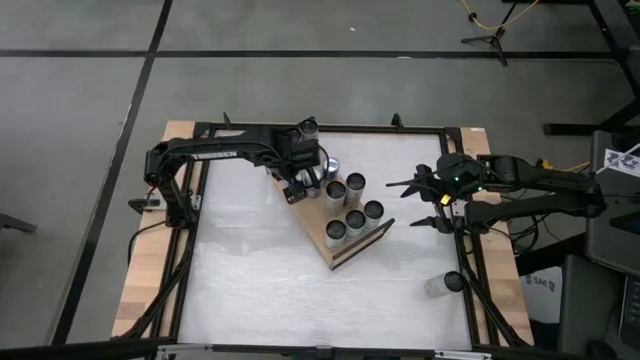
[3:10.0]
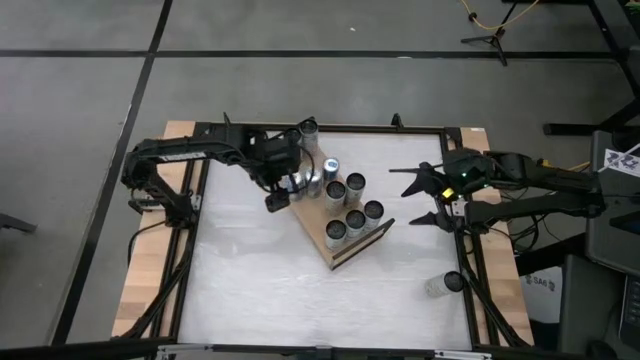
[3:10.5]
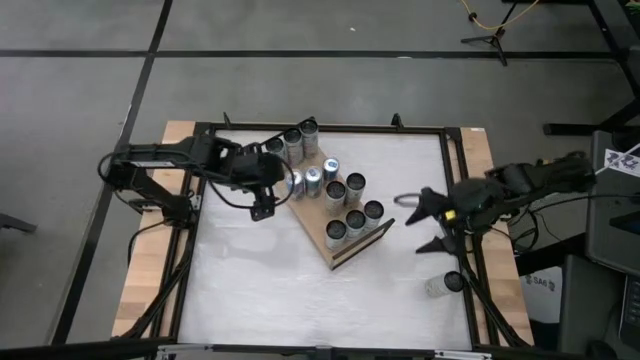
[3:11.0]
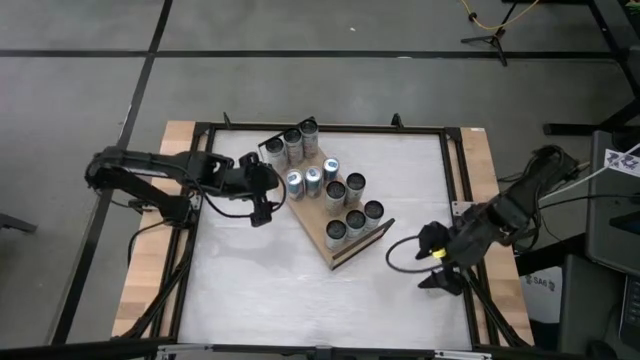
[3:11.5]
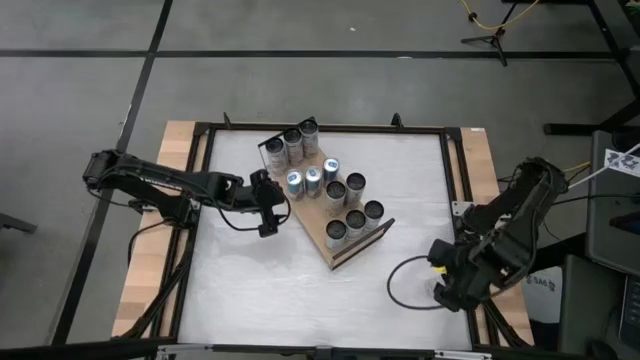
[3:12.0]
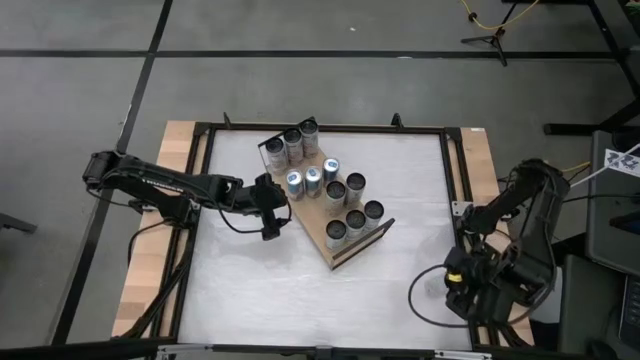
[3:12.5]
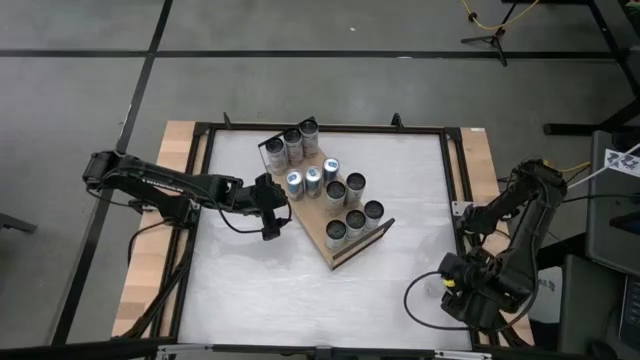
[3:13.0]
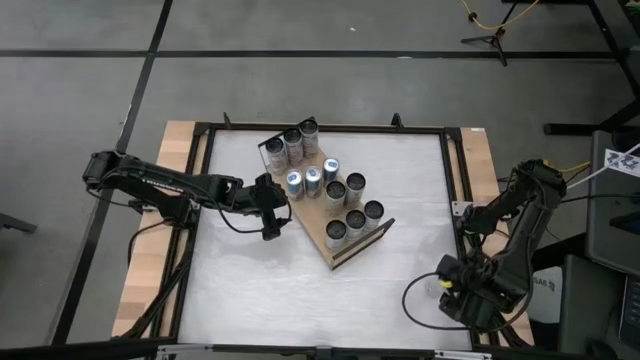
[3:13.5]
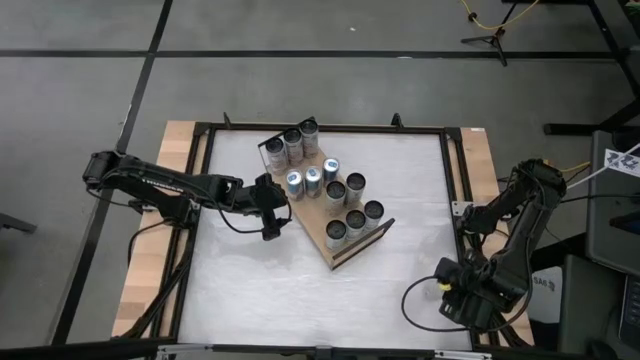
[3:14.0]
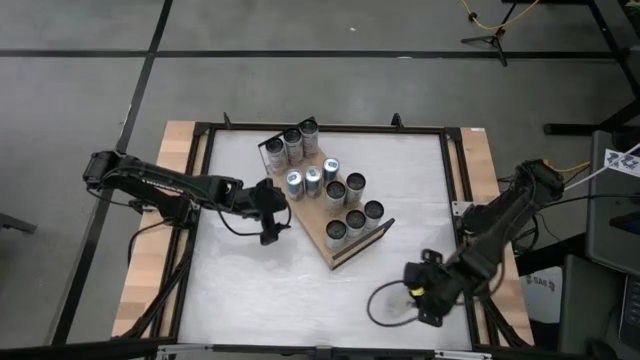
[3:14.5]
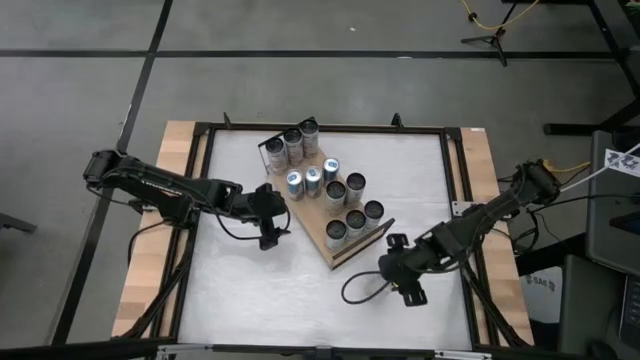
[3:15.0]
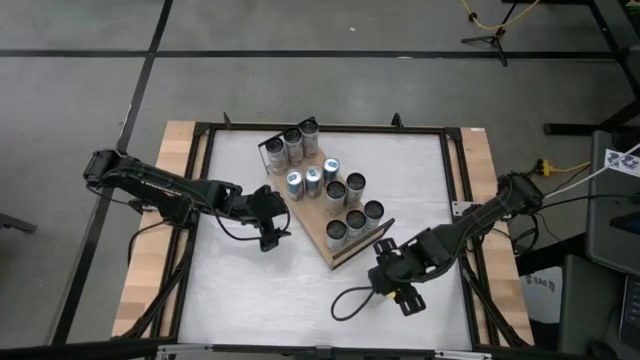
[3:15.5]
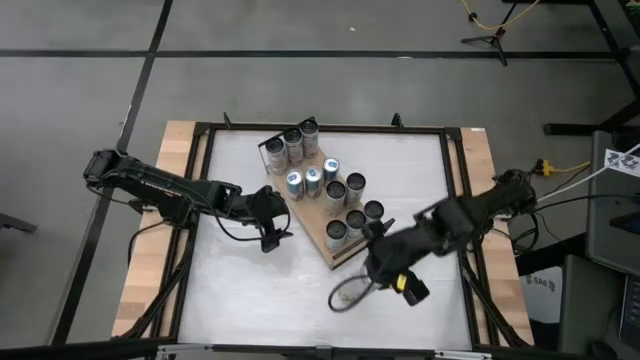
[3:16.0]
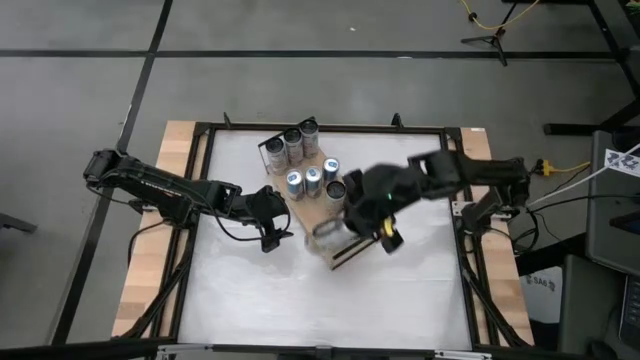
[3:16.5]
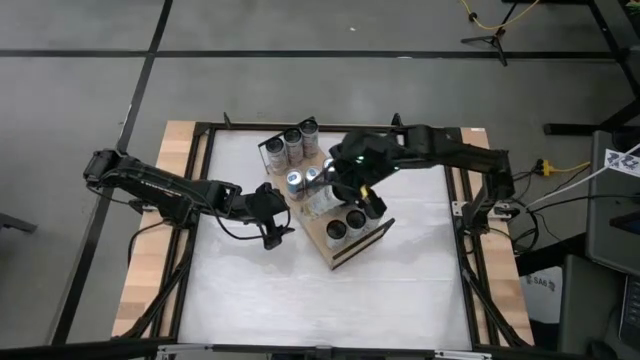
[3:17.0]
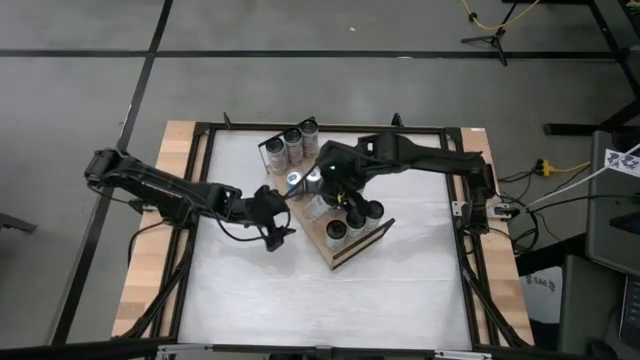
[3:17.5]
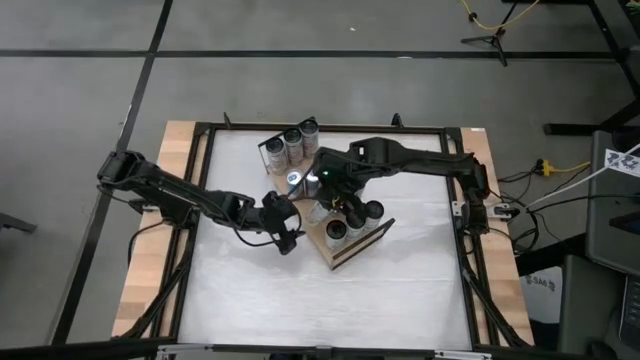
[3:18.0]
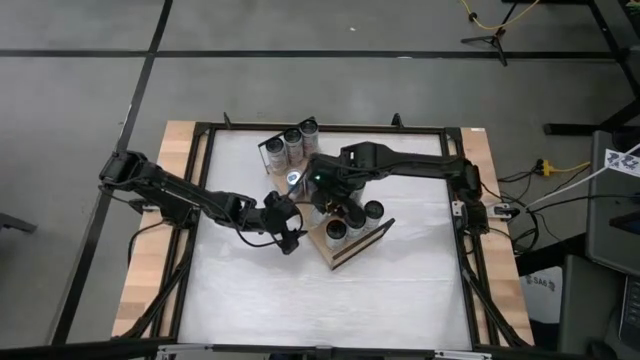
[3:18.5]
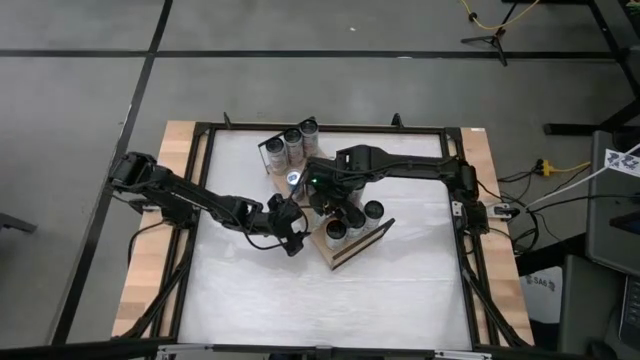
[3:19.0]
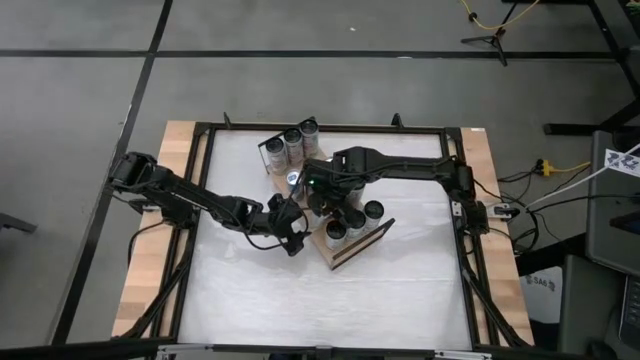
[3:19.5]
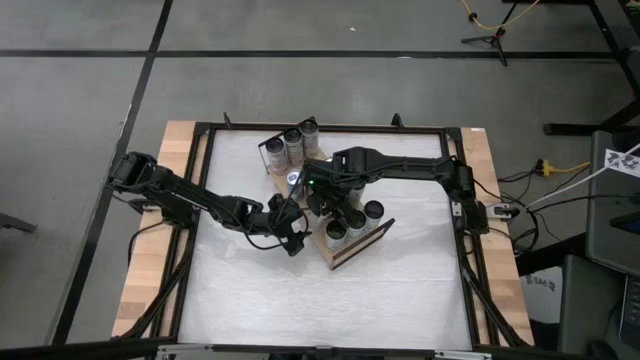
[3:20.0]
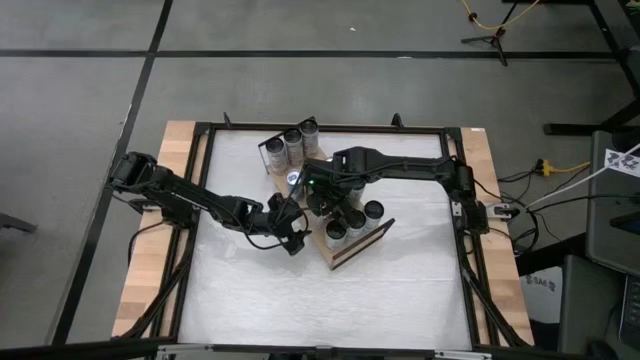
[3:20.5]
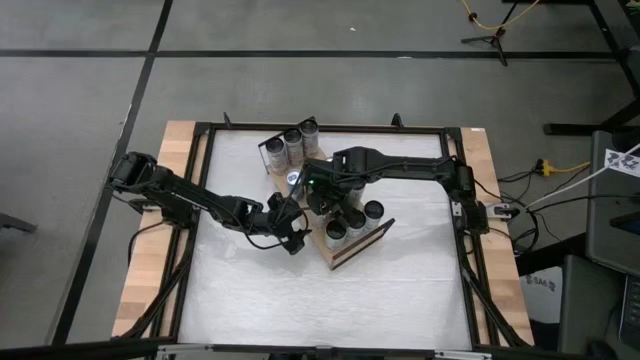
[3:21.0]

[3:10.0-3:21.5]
Task: Place canned beverage on shelf
Put the white-orange soda can on the shelf and align with the other white-orange soda can

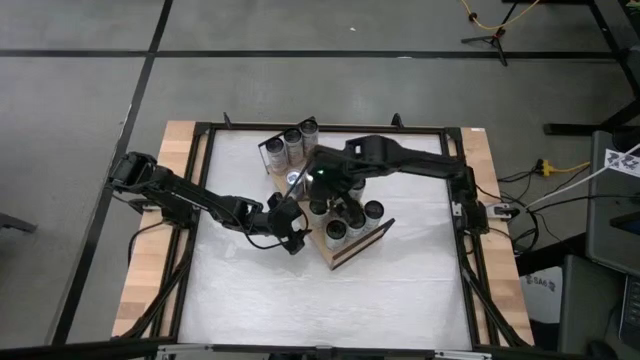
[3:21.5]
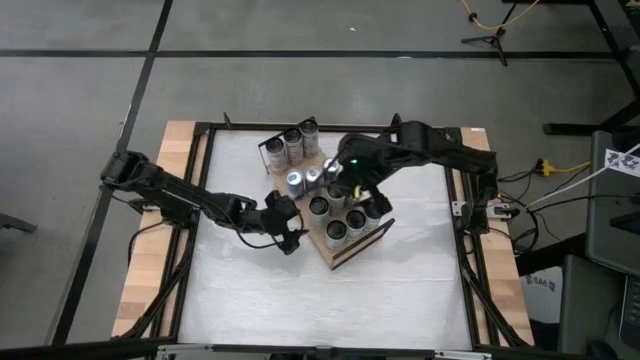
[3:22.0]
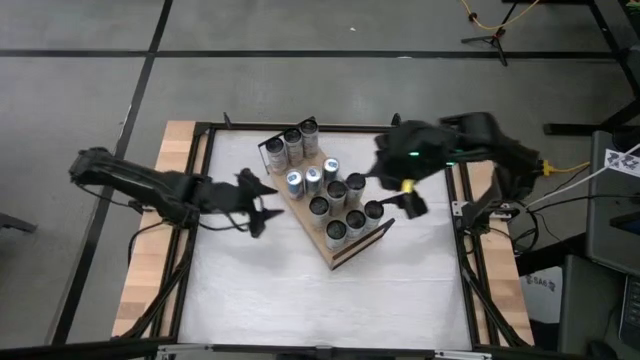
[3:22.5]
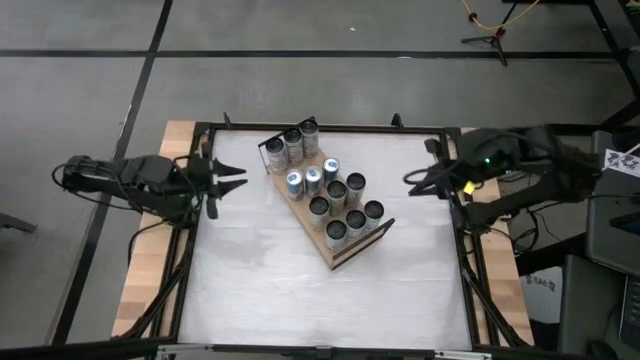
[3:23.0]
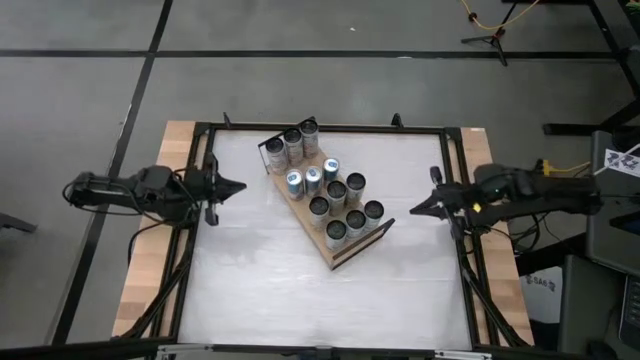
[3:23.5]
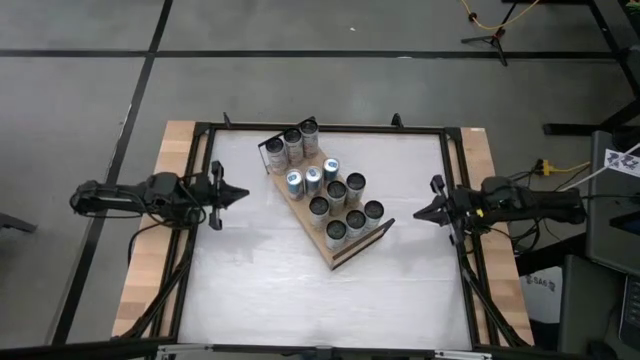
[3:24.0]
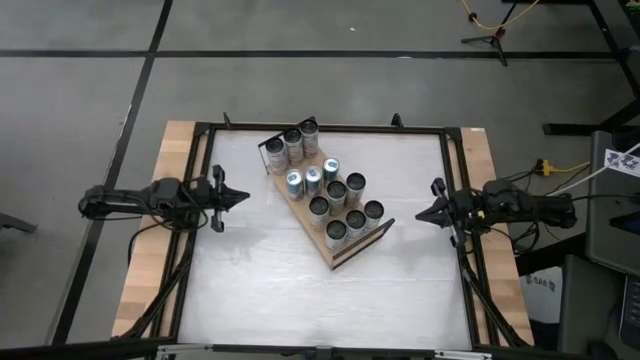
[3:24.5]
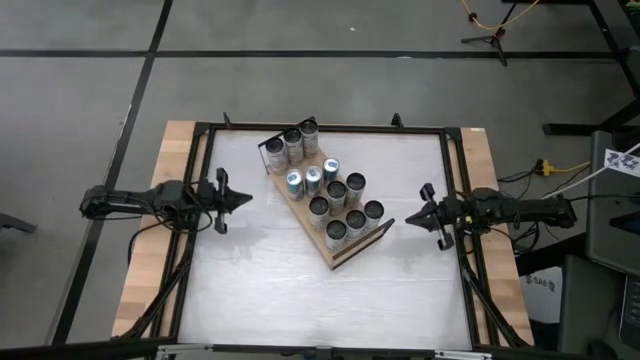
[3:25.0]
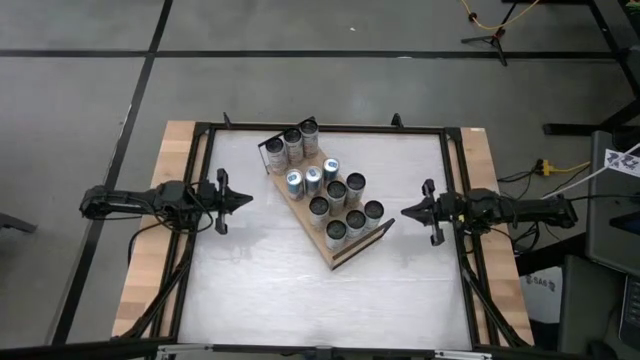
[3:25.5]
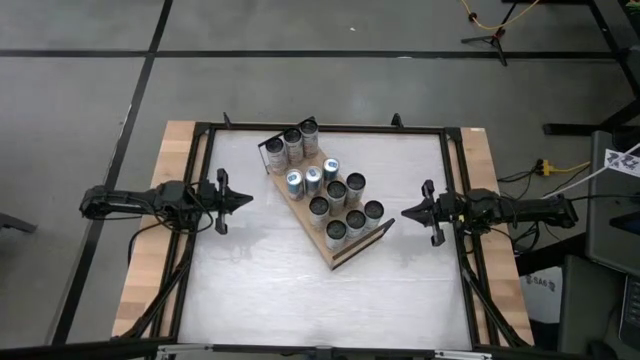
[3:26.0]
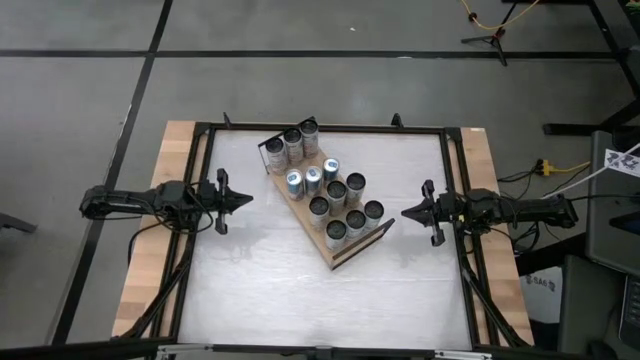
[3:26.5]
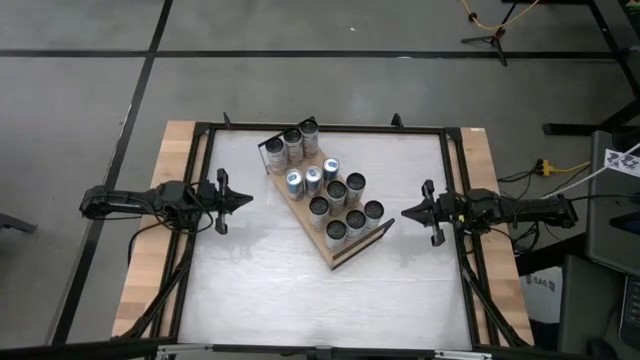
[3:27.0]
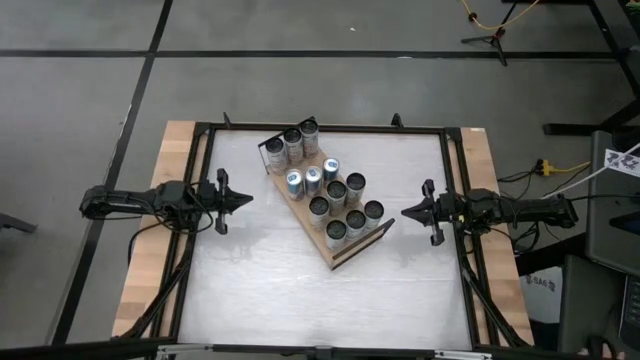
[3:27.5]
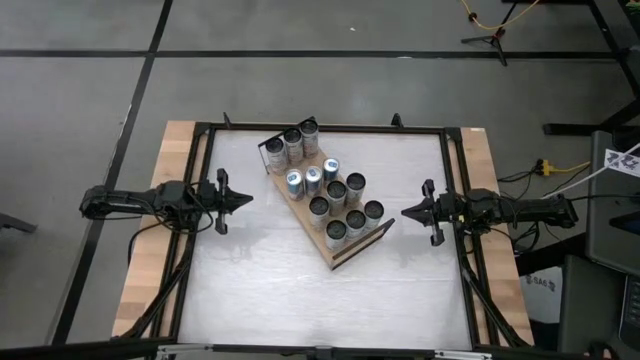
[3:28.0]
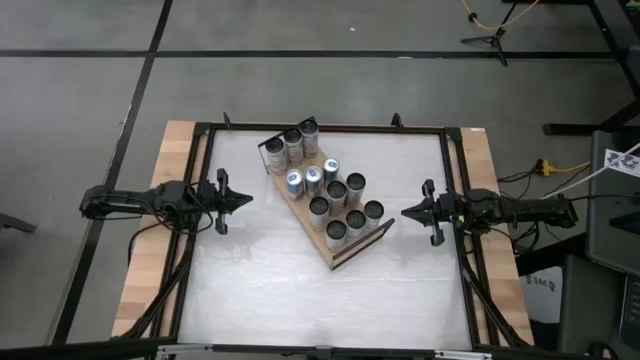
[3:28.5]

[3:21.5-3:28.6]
Return to Home Position

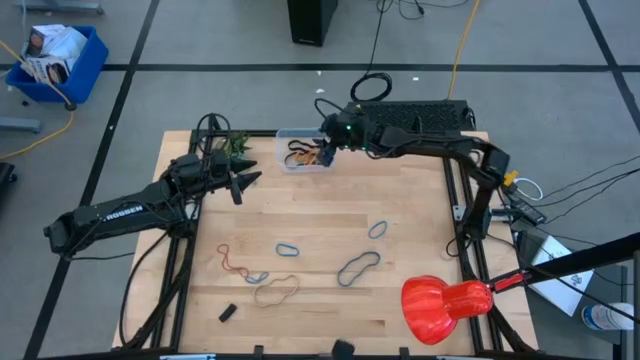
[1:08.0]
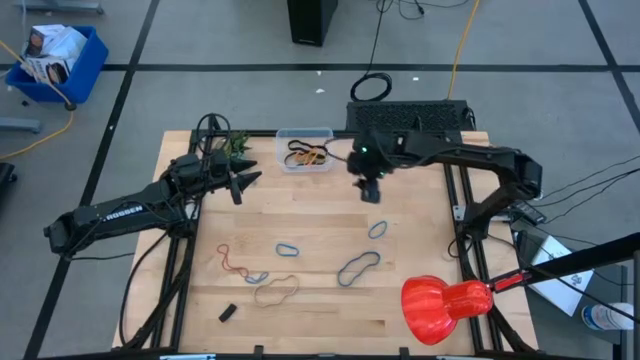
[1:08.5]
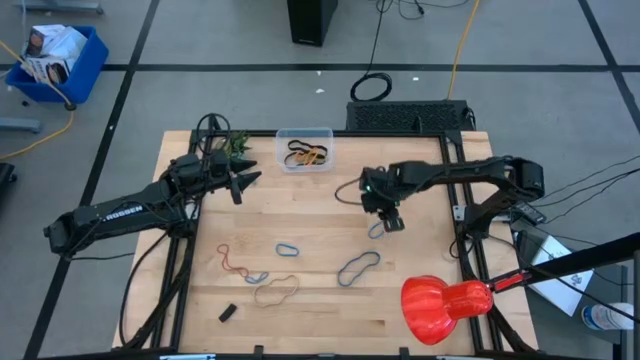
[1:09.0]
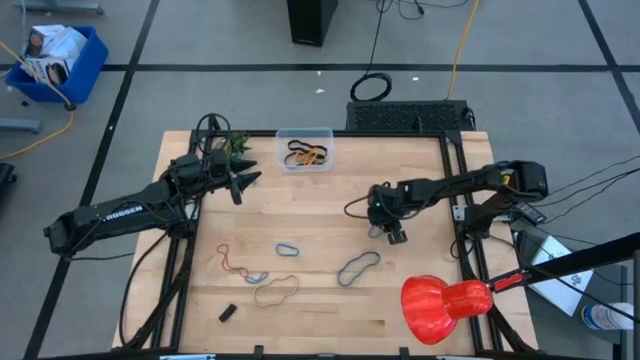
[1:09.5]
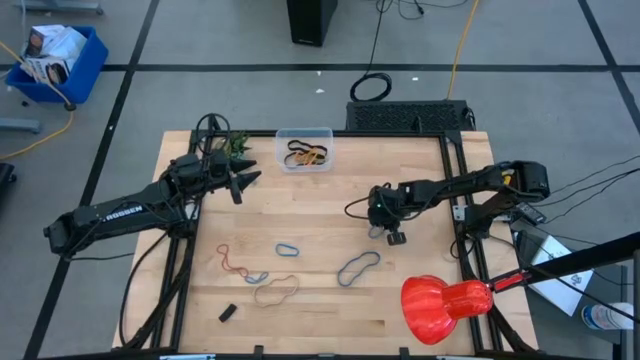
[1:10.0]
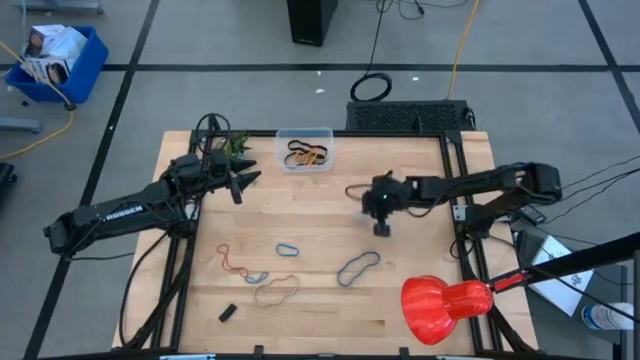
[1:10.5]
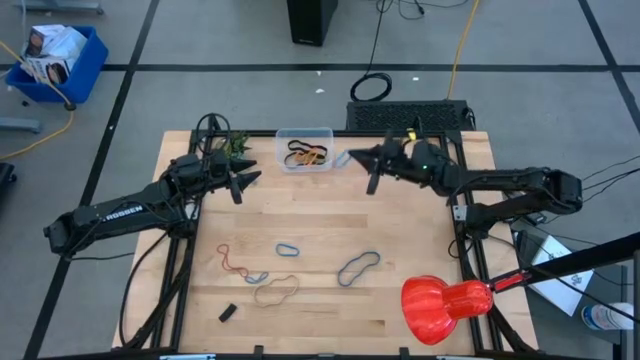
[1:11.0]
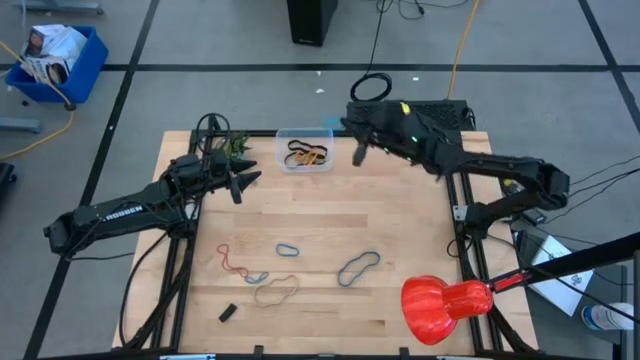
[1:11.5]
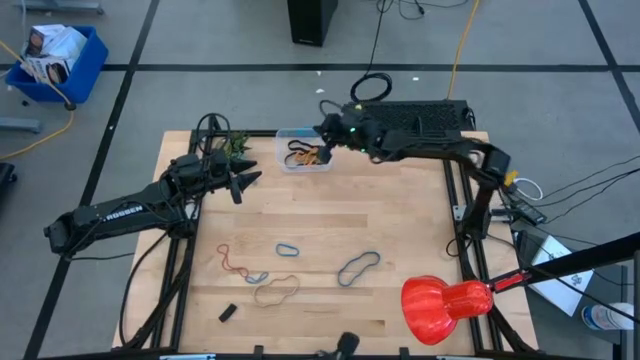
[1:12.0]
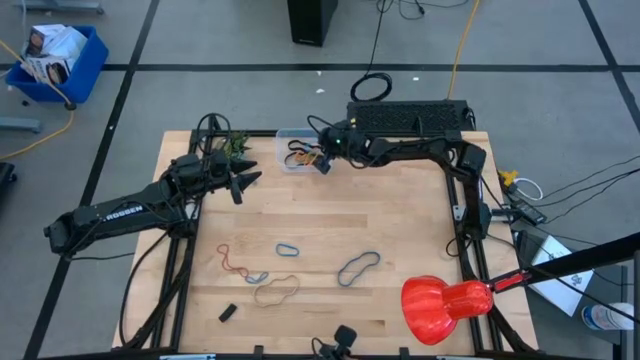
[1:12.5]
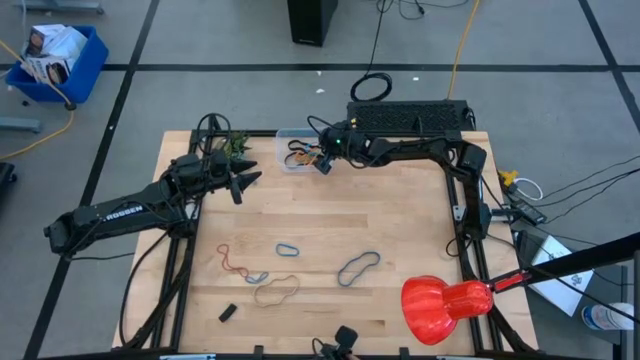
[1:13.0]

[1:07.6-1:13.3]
Task: Pick and place rubber bands into bin
Put the top right blue rubber band into the transparent bin
